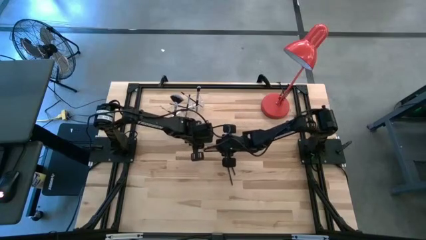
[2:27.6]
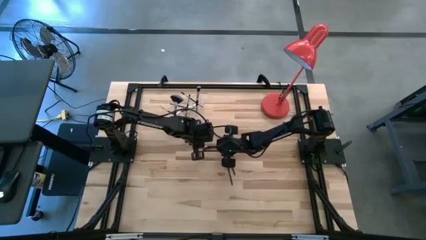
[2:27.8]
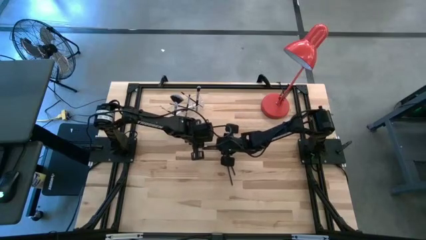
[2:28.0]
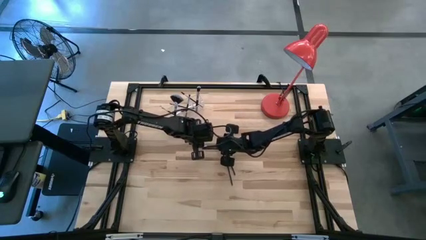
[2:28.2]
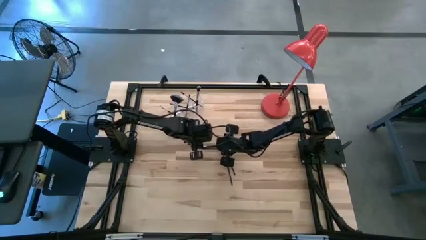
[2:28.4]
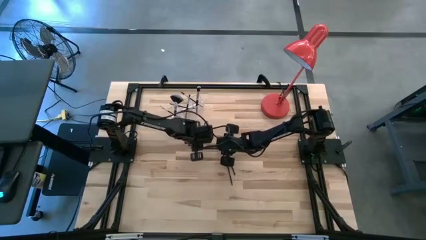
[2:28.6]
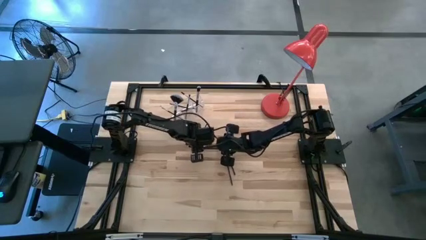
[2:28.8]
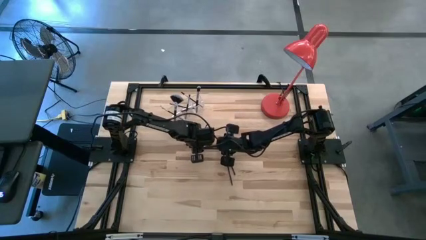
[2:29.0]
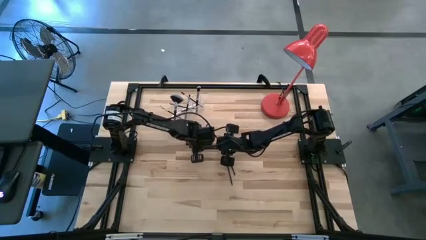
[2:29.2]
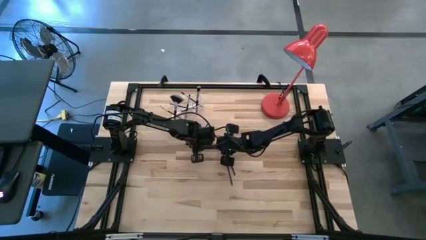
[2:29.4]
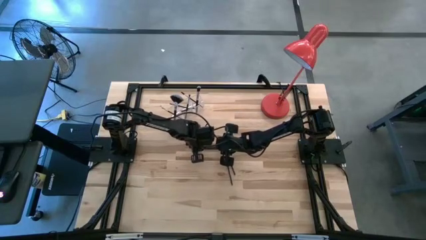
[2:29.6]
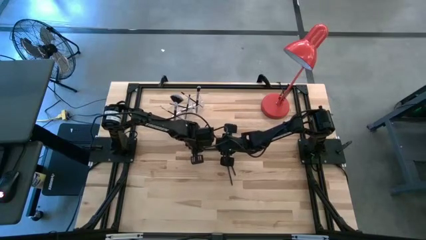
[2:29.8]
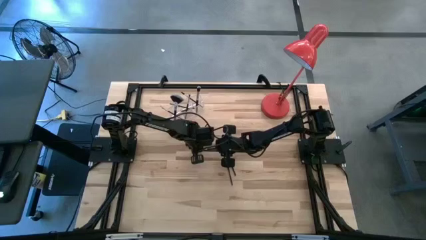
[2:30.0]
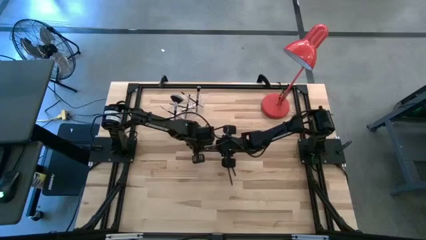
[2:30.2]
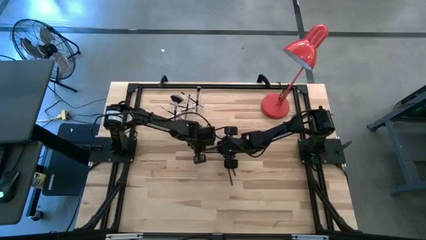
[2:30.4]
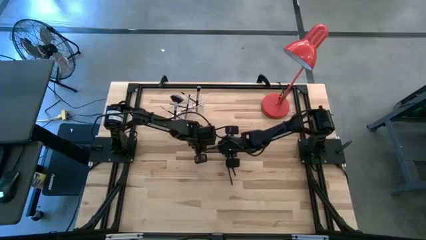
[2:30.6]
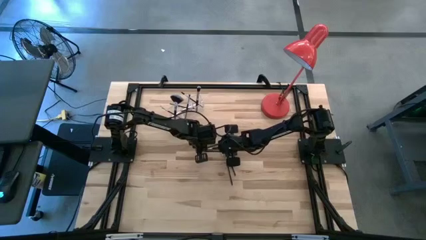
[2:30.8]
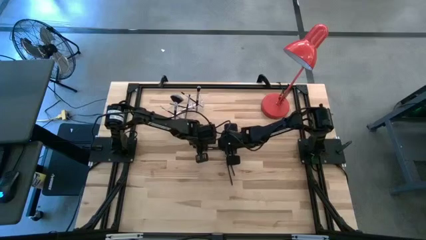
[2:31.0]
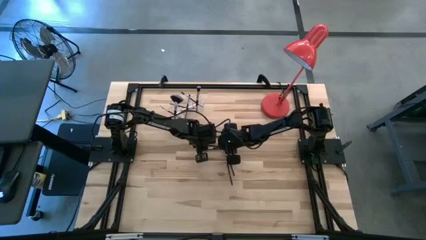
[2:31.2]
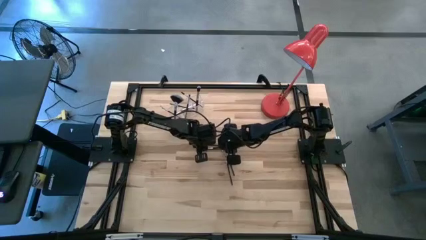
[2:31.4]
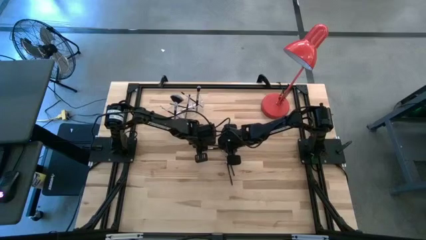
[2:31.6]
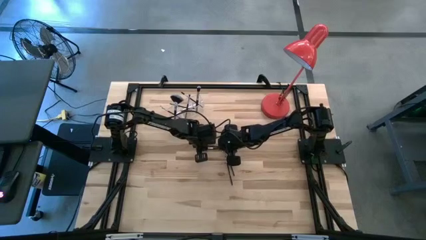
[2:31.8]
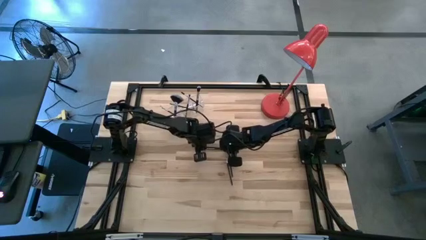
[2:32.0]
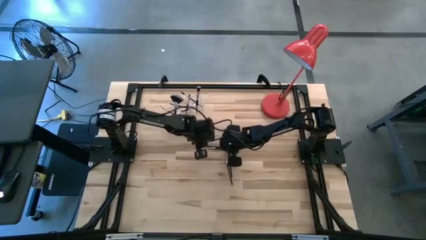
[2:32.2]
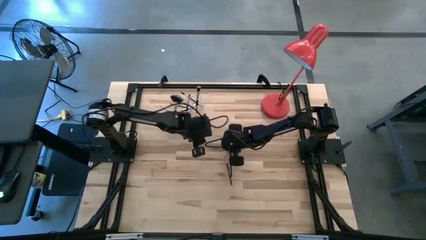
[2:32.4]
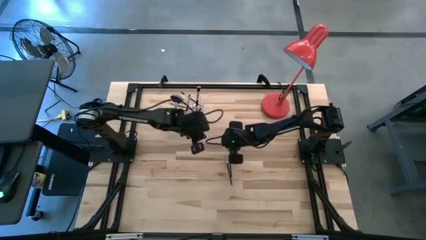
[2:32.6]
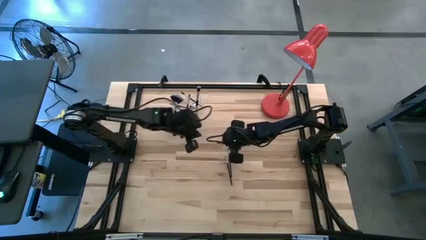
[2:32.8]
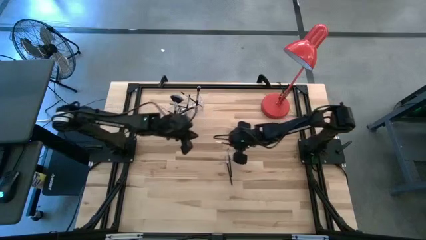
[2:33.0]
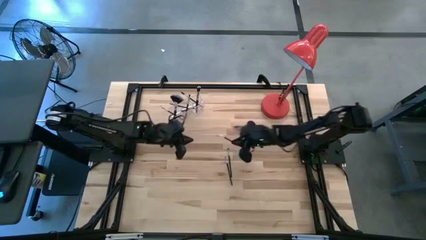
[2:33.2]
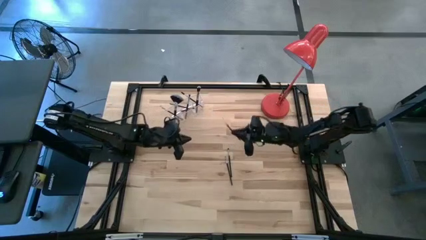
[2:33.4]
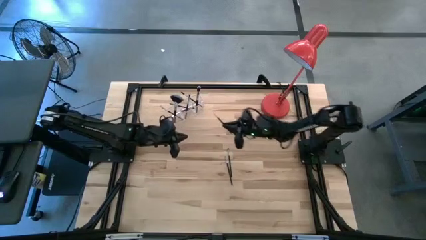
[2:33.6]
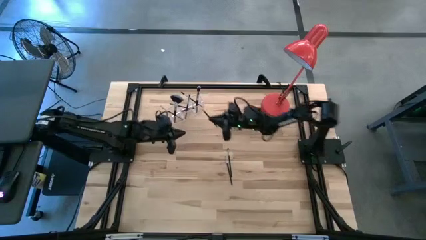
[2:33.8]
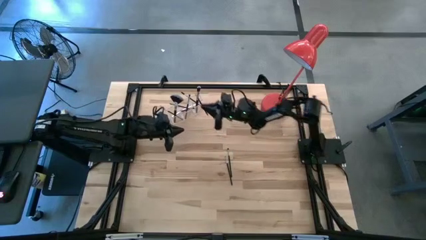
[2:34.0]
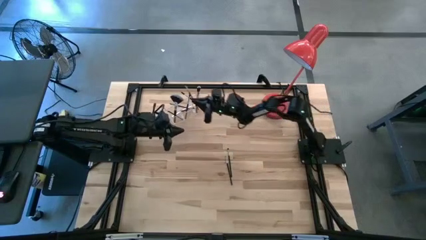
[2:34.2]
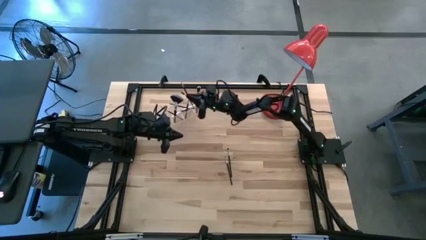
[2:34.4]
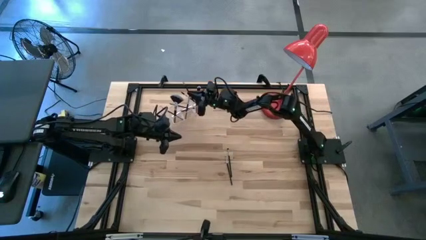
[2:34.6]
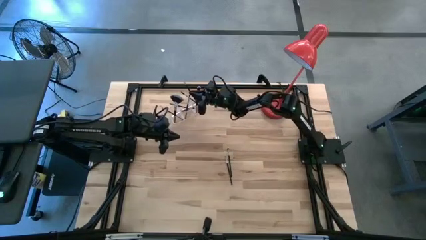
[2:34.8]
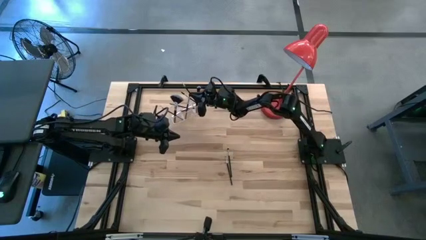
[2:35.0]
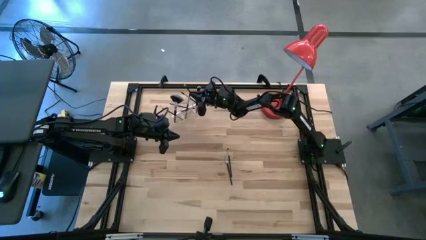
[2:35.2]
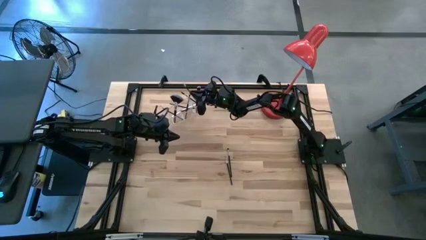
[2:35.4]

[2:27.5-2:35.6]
Task: Put items in baskets/containers
Put the liner brush into the transparent organizer

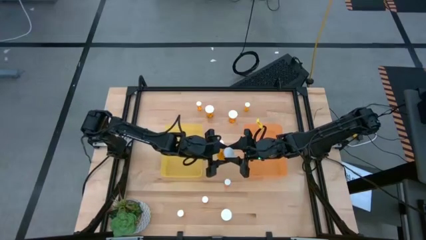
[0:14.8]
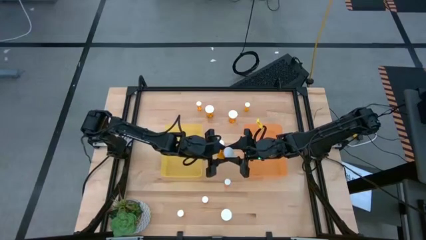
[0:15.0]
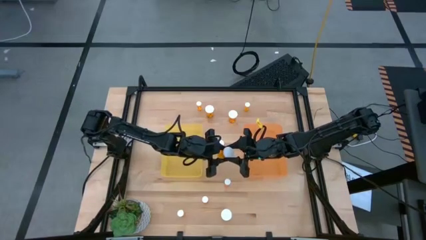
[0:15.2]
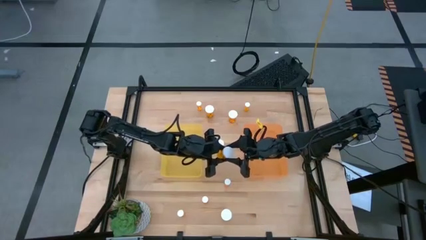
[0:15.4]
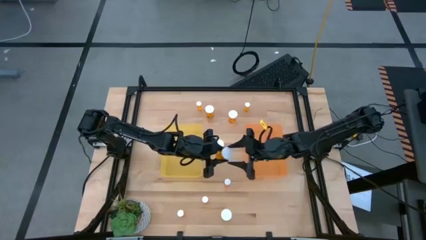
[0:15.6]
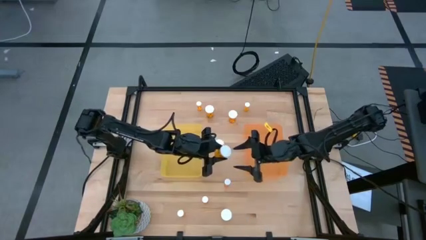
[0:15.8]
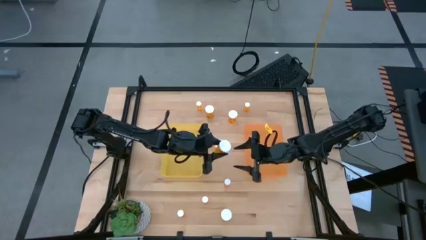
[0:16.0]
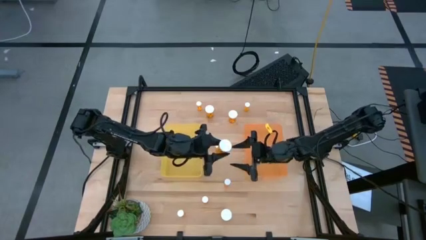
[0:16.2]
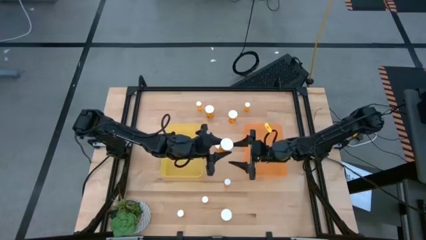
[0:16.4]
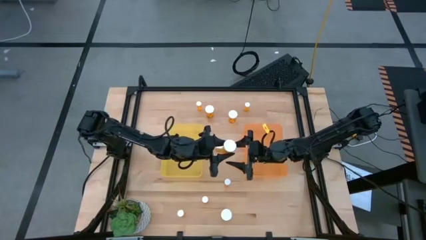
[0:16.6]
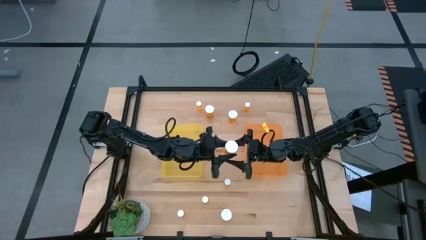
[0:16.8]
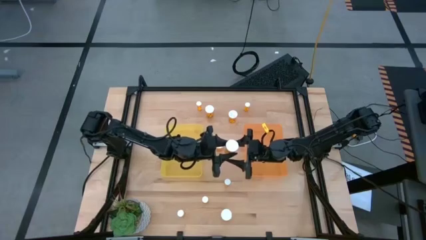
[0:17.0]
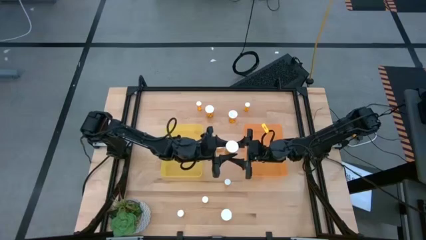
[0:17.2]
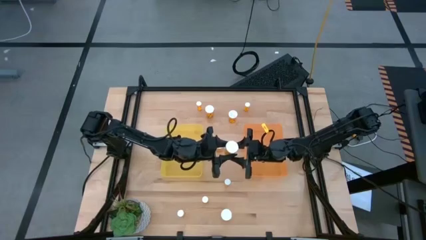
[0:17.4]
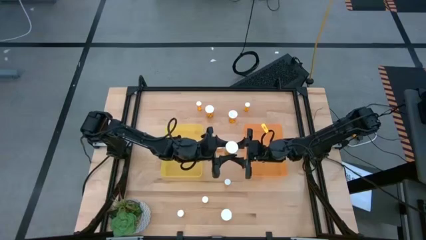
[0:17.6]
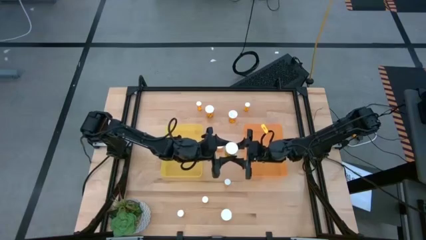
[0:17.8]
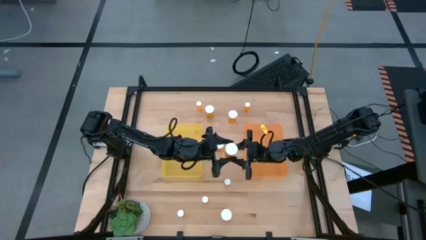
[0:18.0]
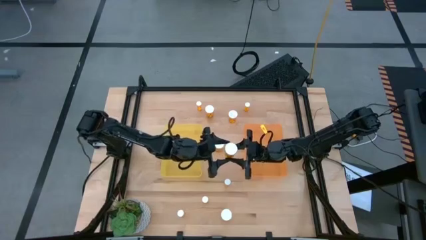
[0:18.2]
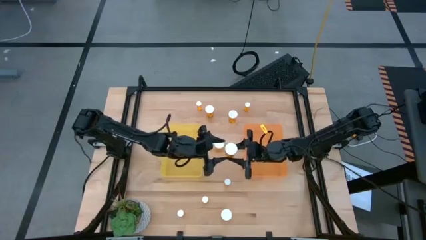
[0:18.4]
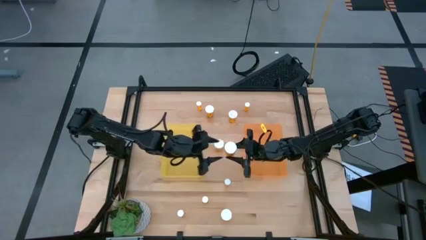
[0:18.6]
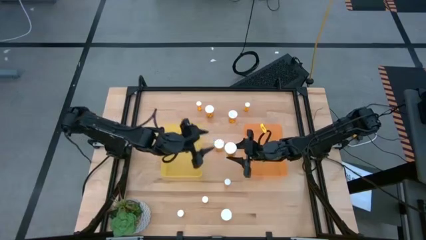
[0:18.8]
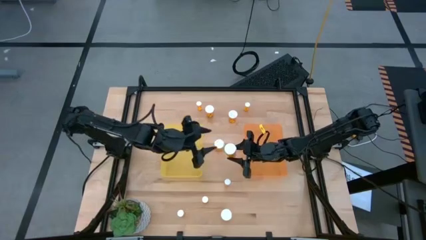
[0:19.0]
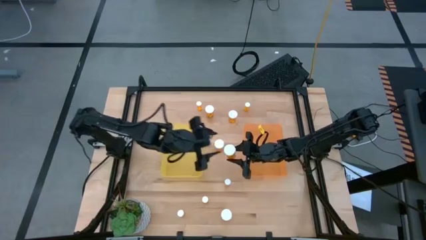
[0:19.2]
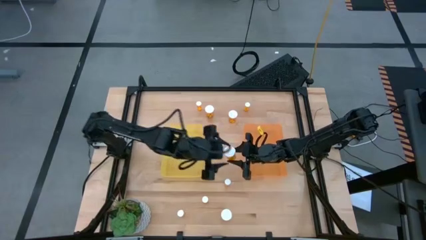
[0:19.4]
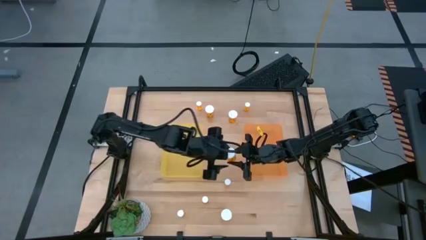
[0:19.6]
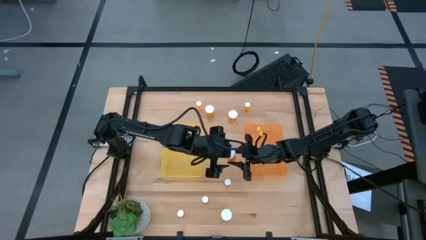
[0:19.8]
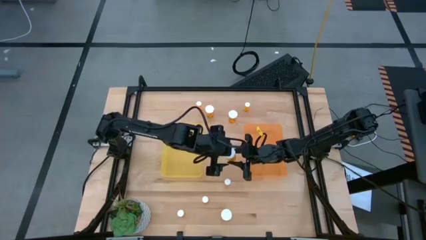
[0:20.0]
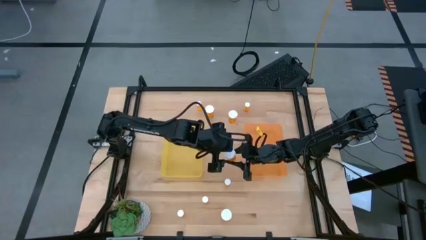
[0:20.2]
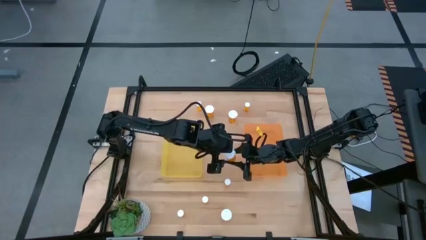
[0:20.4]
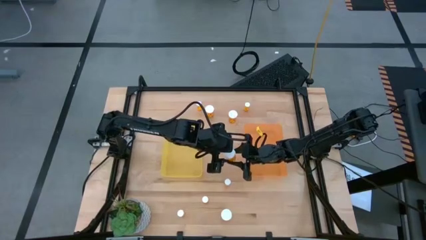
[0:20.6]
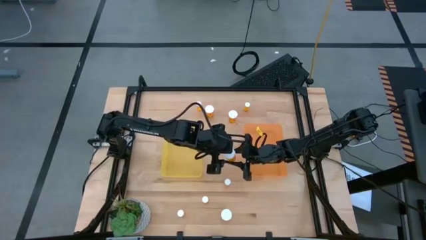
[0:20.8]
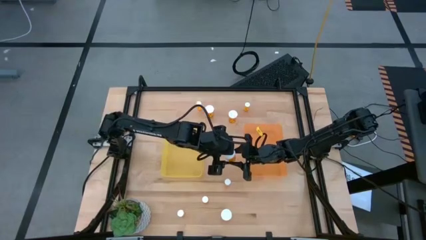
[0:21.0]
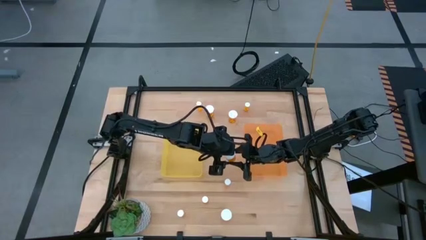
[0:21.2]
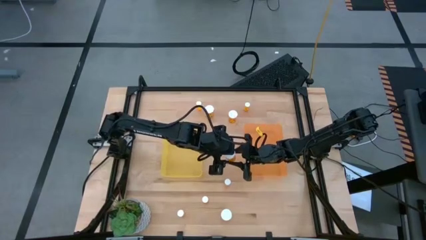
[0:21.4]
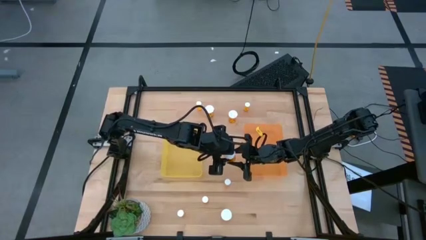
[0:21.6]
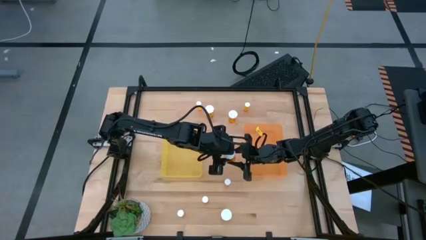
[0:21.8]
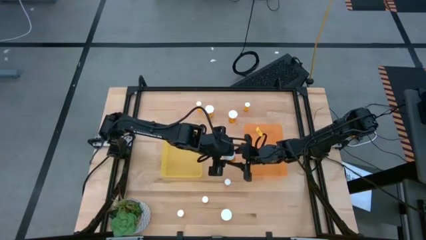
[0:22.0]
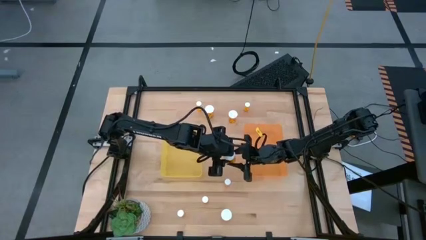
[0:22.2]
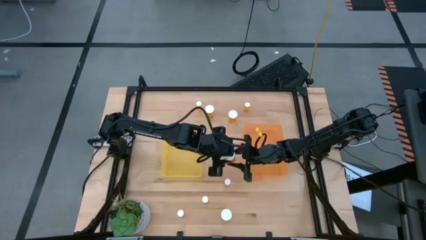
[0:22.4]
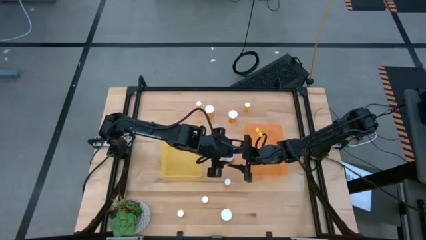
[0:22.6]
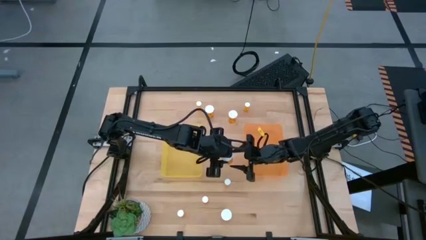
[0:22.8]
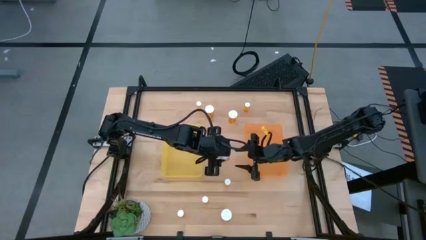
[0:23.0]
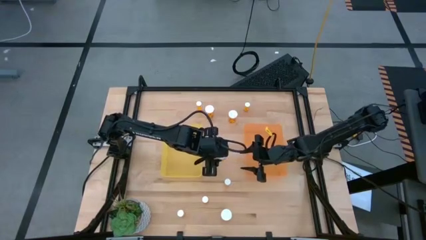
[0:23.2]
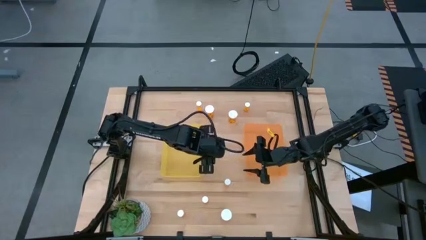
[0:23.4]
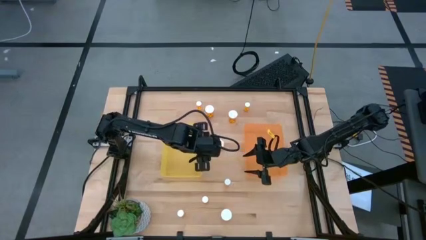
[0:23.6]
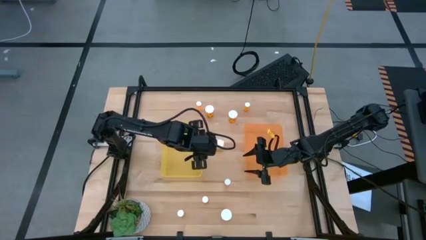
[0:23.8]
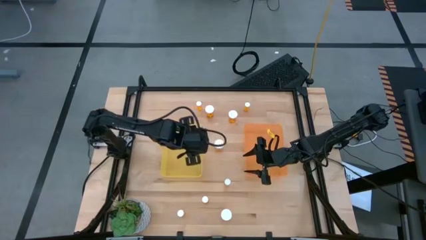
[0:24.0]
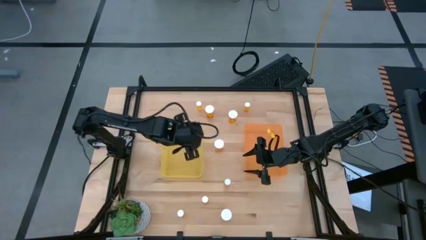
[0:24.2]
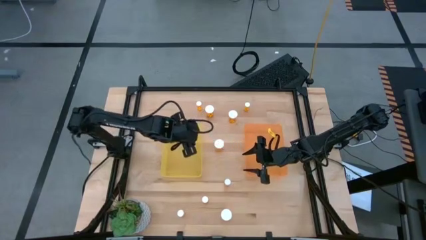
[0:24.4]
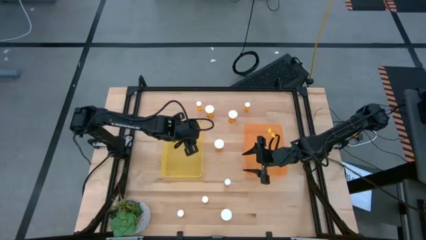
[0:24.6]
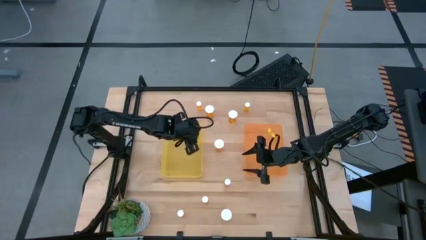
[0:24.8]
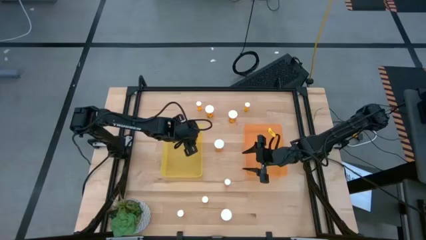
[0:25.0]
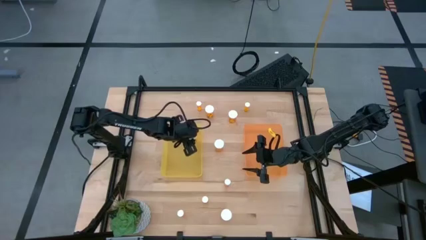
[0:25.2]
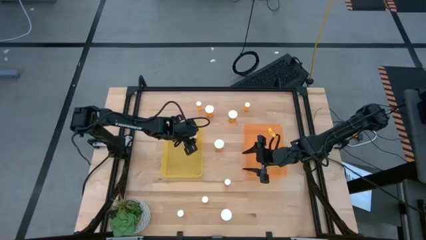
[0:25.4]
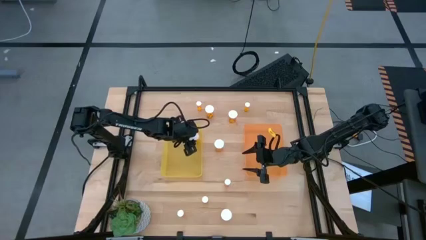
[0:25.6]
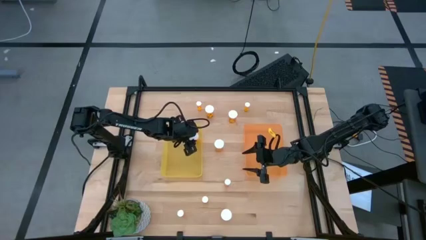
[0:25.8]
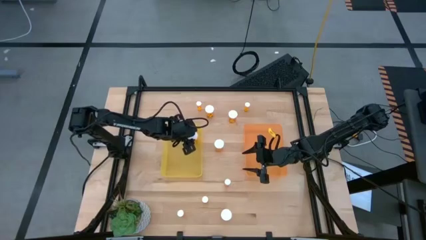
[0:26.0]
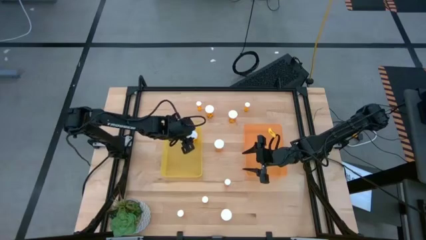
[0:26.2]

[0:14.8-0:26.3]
Task: Pick and place medicine bottles into bin by pill shape (circle, oval)
Put the large orange pill bottle into the yellow bin
